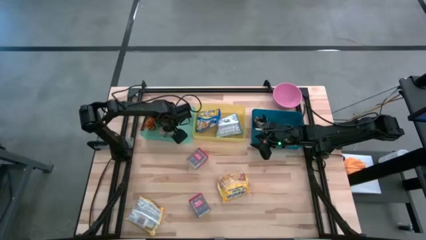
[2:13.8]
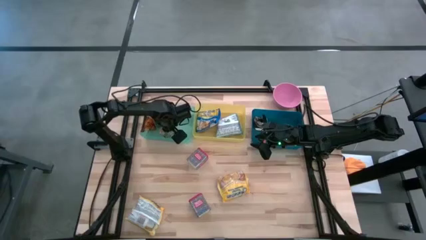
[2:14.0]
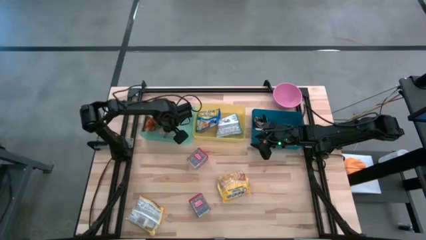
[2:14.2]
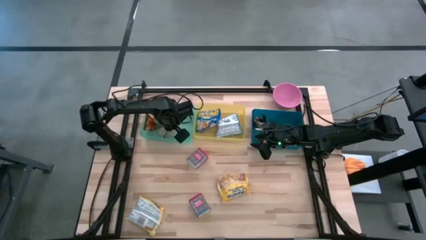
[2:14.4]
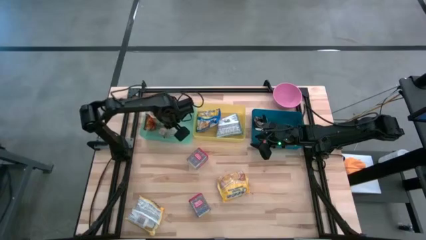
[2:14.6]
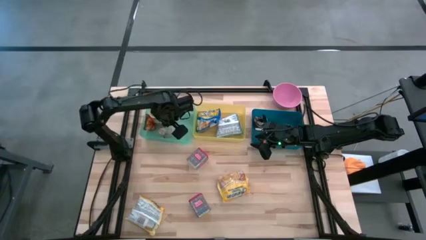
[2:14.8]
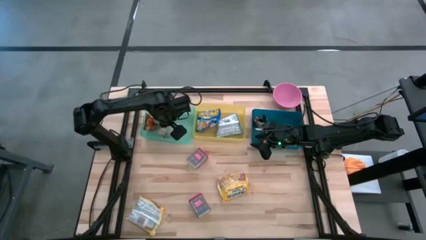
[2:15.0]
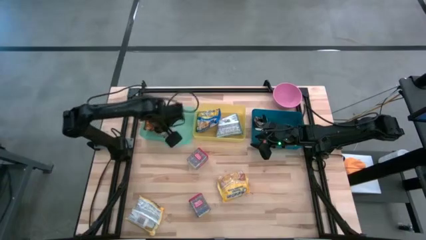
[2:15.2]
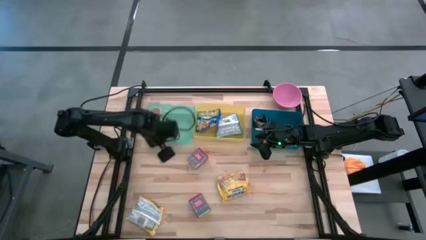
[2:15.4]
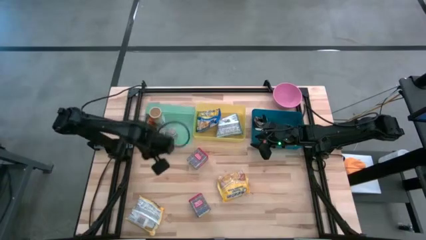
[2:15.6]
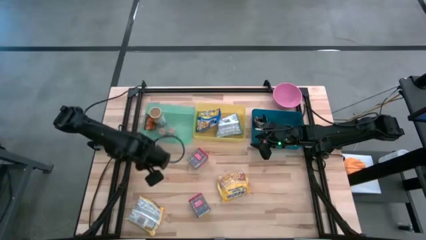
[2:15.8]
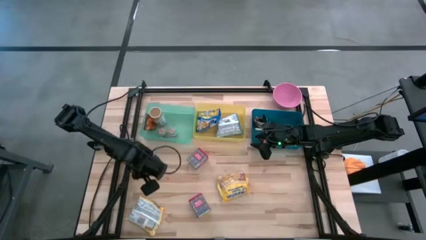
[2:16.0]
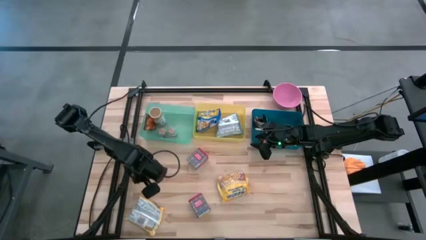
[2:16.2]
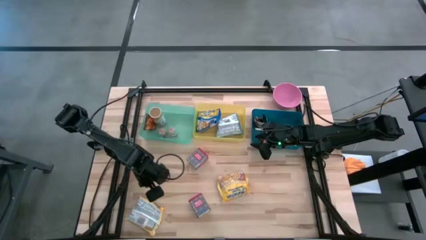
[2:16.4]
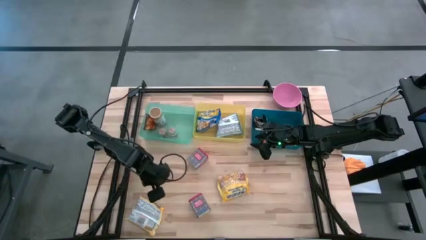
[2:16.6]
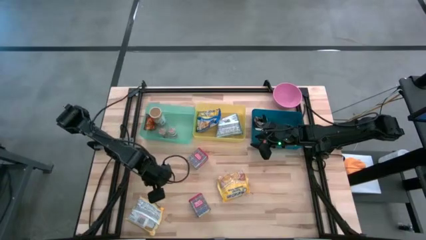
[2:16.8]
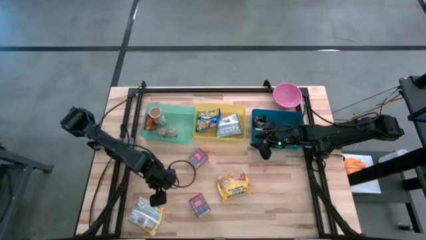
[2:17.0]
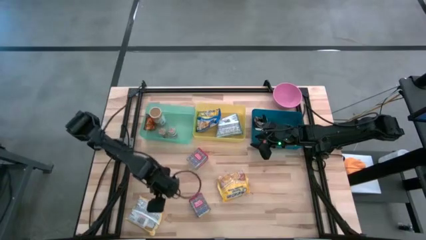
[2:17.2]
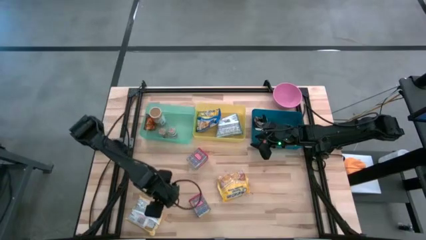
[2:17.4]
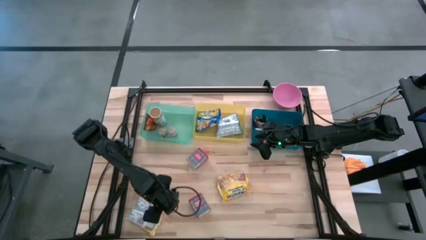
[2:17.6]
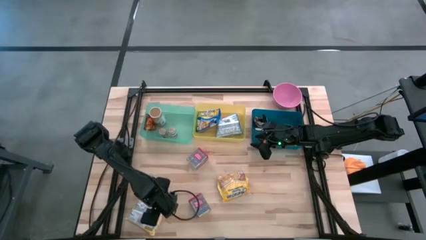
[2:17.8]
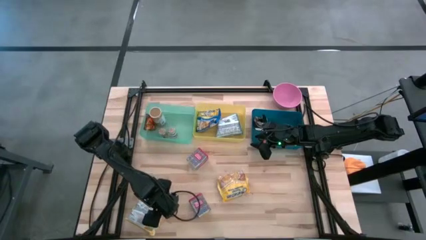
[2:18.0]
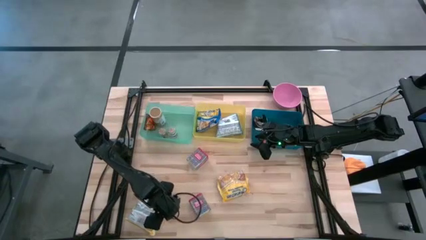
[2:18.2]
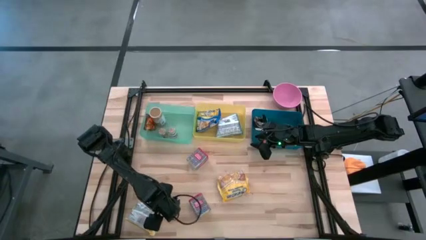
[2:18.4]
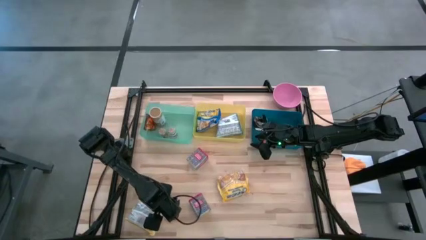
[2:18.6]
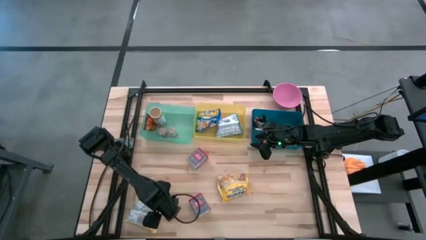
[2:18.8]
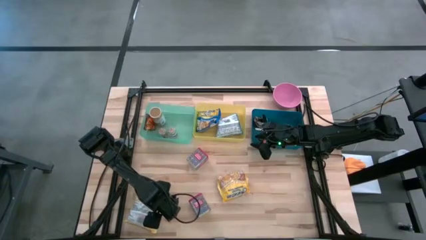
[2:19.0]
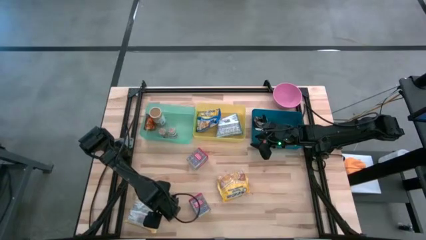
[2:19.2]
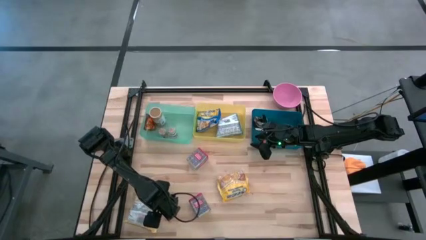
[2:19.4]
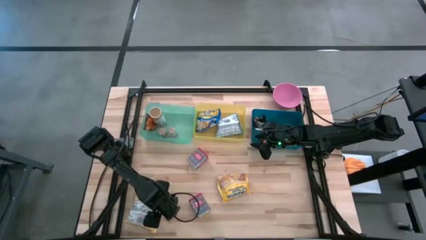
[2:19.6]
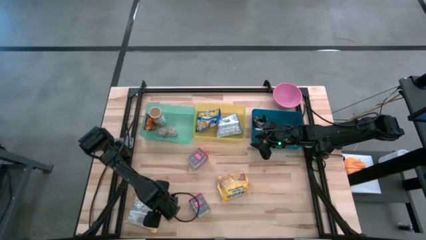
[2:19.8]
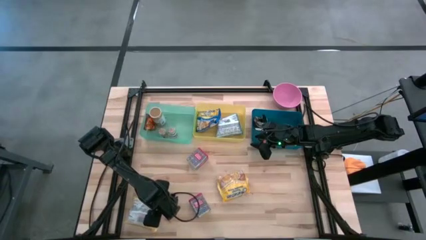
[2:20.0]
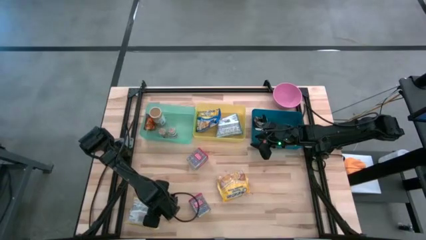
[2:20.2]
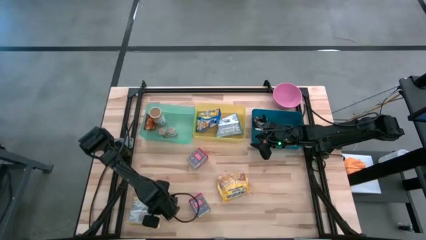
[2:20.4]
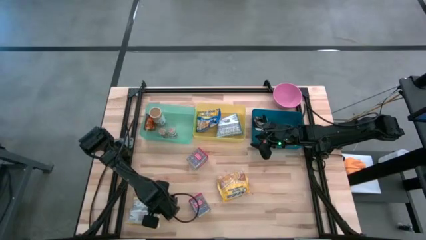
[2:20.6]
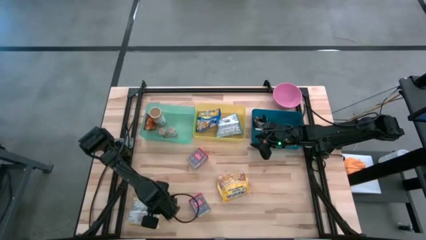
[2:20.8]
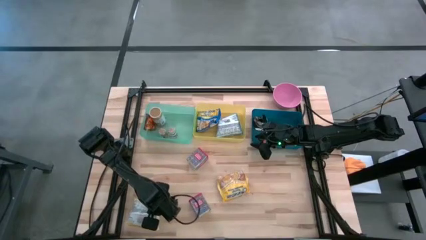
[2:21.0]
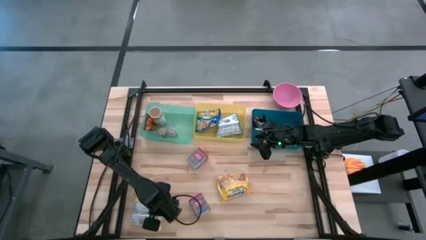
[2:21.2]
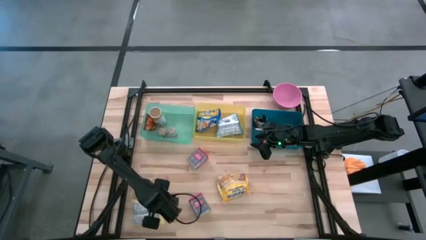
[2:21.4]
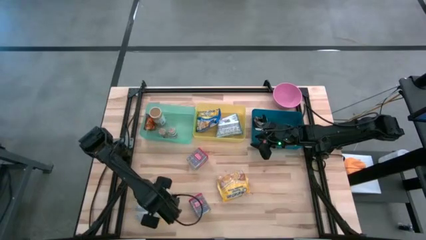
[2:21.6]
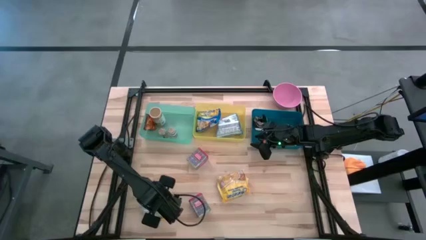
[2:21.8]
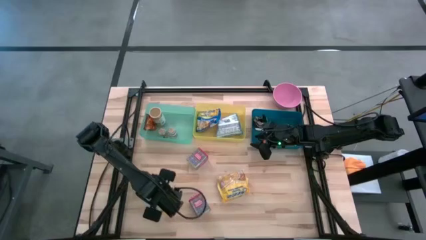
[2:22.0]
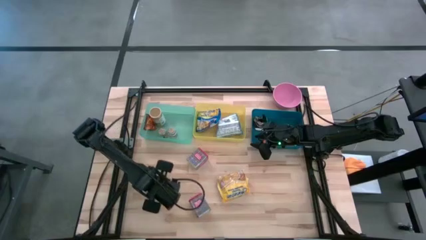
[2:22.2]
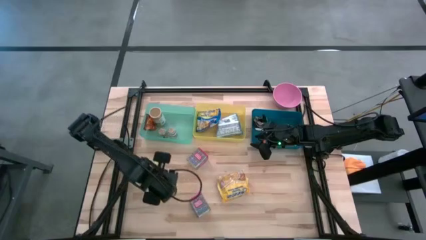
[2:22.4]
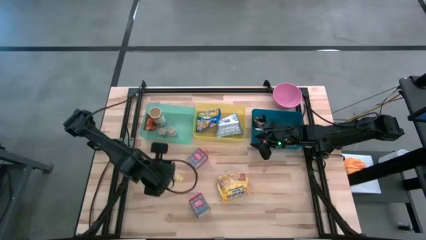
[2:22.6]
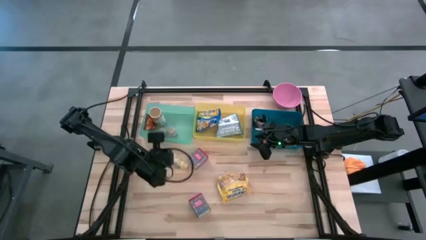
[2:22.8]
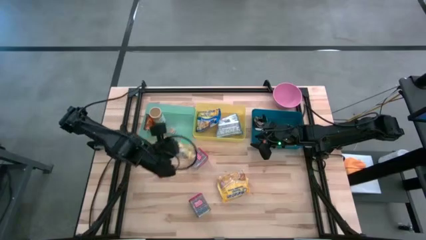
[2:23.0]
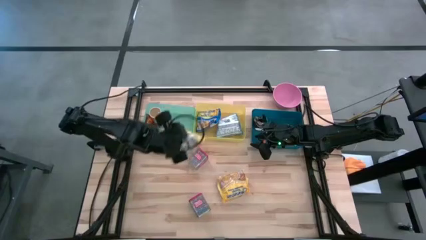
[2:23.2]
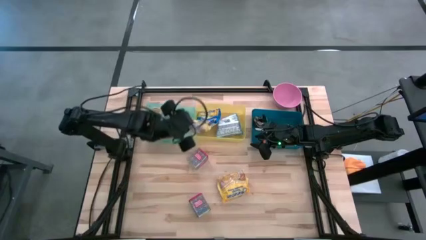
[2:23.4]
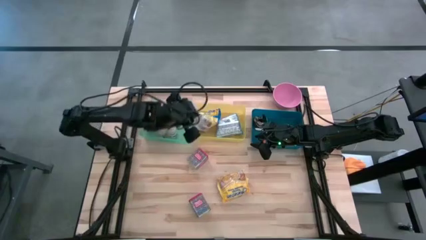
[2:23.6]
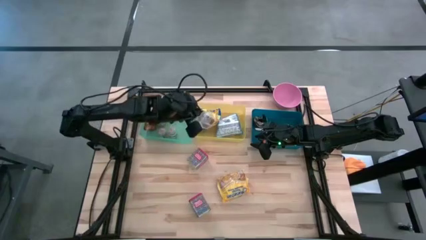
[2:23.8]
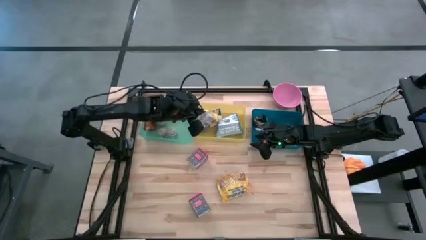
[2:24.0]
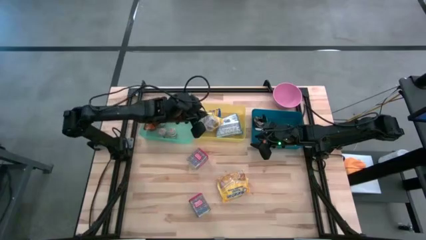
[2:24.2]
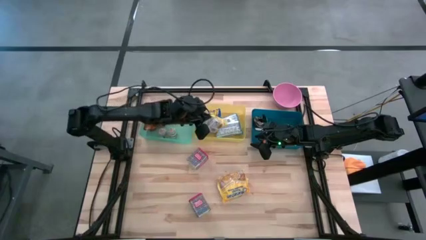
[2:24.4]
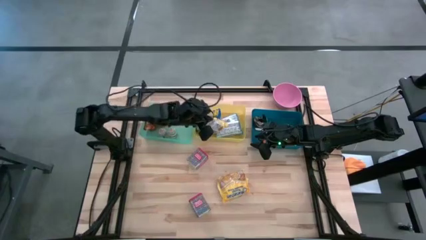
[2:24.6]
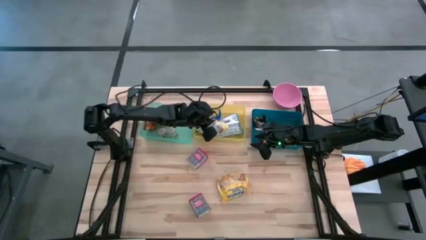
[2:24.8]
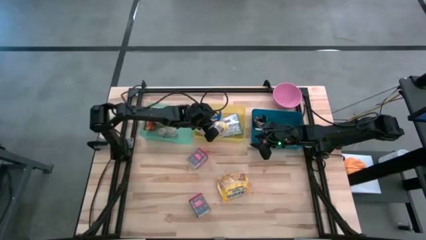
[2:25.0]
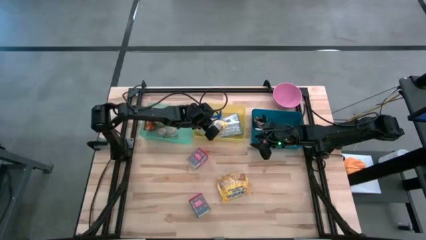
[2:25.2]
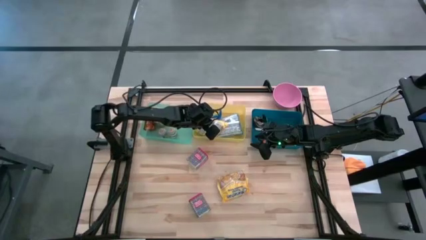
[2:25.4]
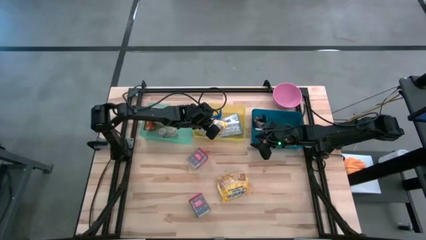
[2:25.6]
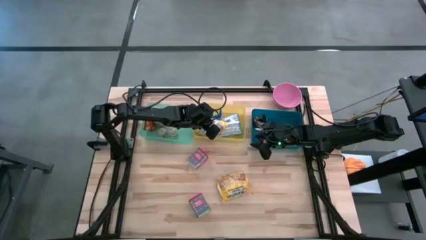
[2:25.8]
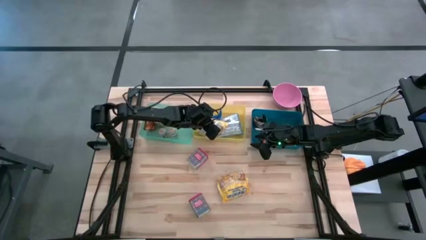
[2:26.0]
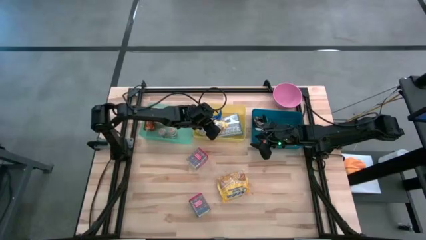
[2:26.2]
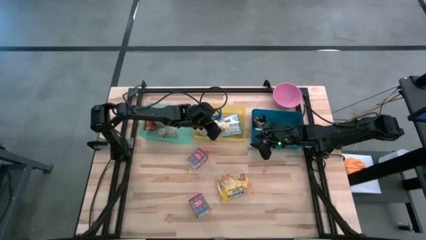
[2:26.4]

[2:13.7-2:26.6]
Put the yellow noodle pack into the yellow bin
